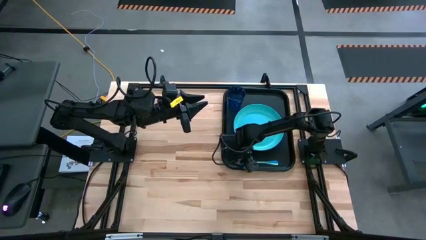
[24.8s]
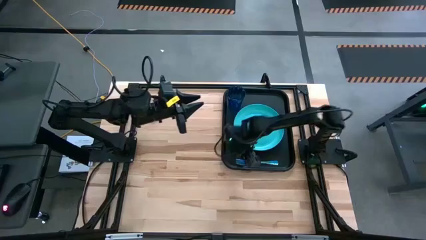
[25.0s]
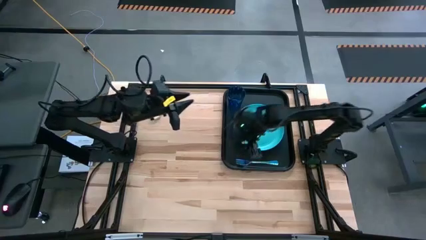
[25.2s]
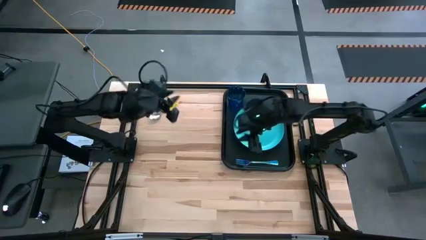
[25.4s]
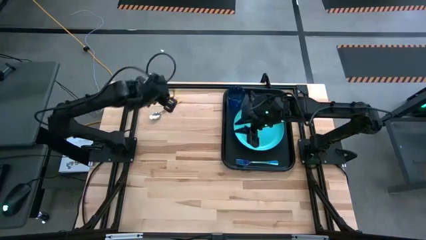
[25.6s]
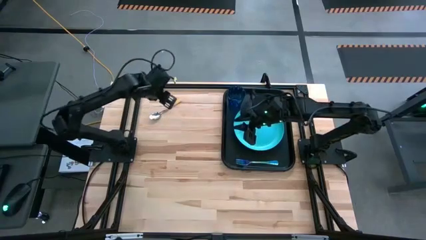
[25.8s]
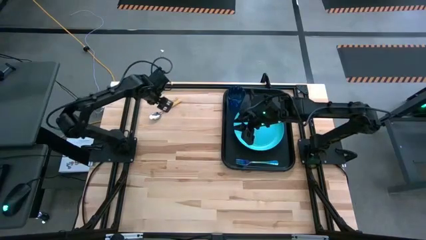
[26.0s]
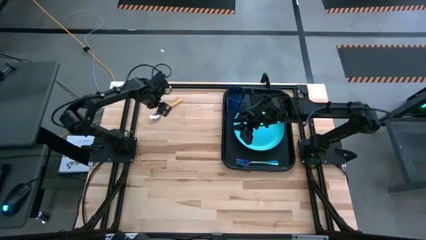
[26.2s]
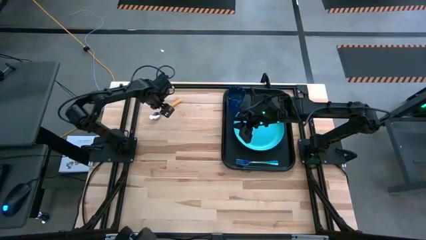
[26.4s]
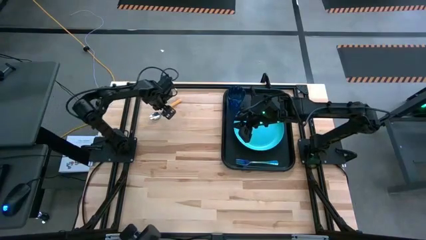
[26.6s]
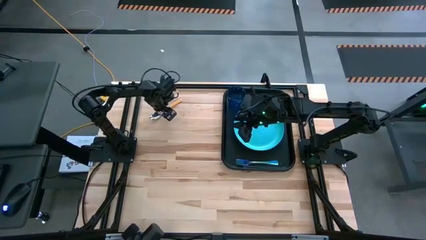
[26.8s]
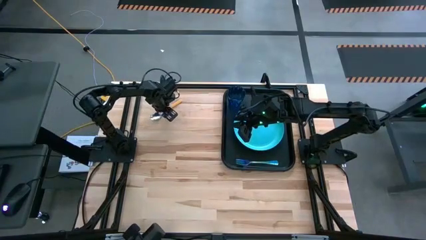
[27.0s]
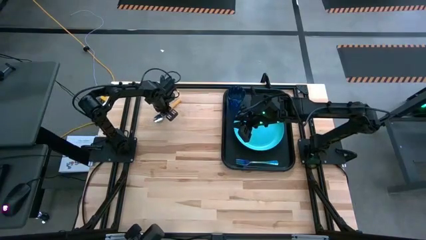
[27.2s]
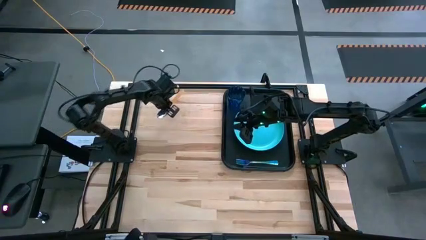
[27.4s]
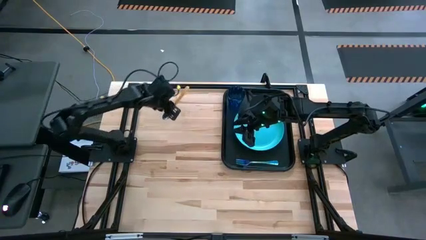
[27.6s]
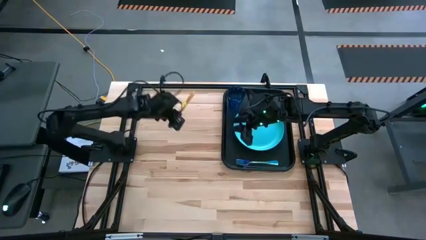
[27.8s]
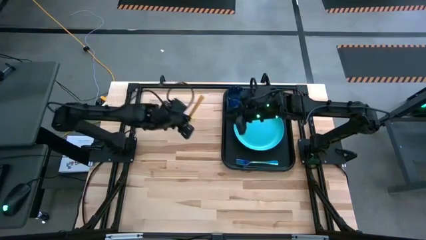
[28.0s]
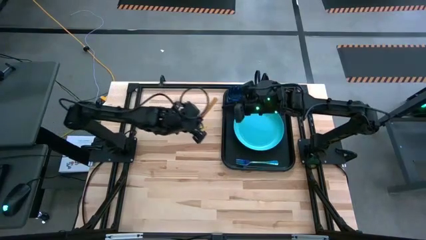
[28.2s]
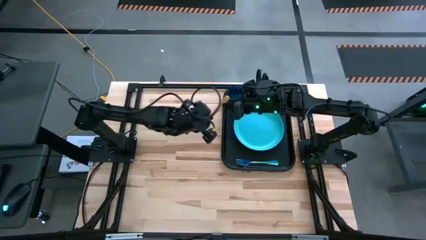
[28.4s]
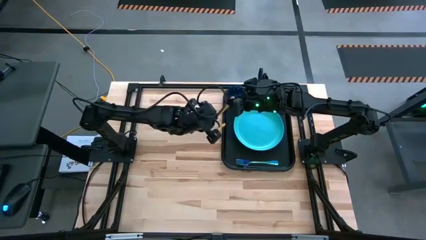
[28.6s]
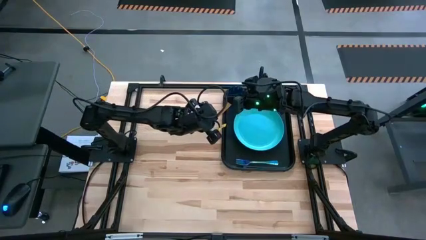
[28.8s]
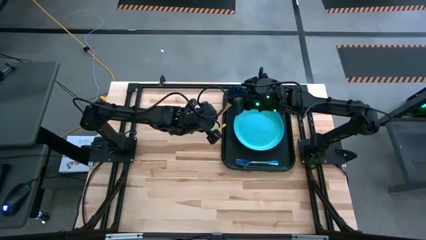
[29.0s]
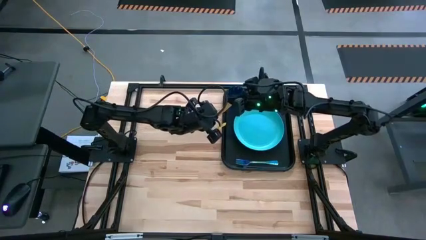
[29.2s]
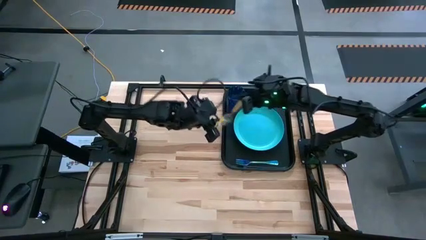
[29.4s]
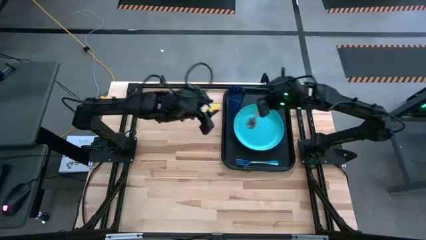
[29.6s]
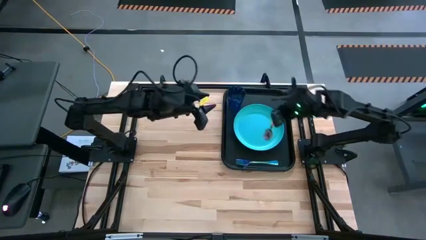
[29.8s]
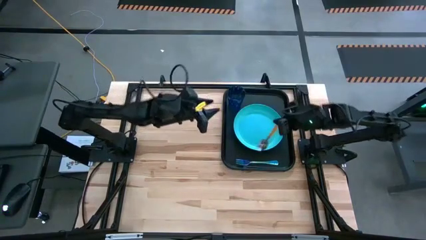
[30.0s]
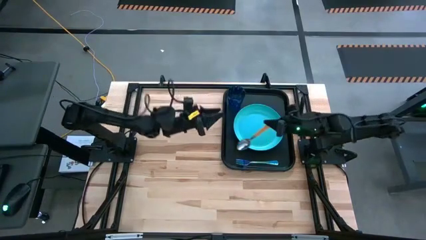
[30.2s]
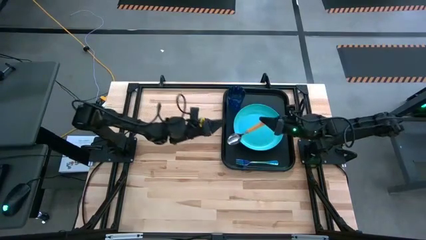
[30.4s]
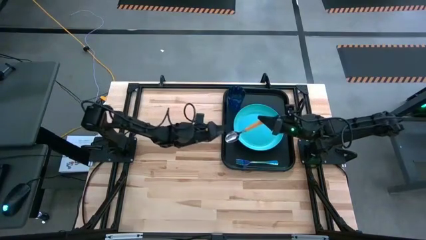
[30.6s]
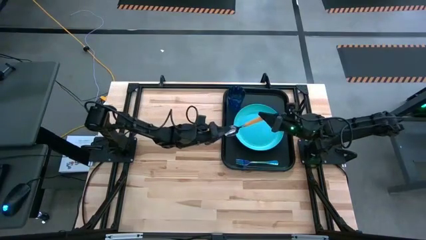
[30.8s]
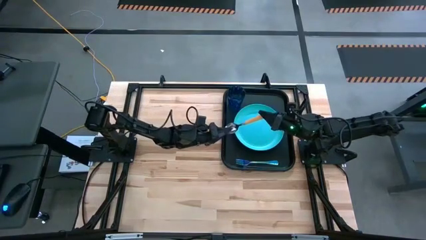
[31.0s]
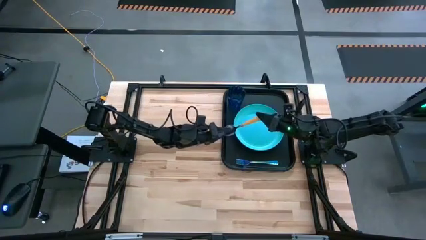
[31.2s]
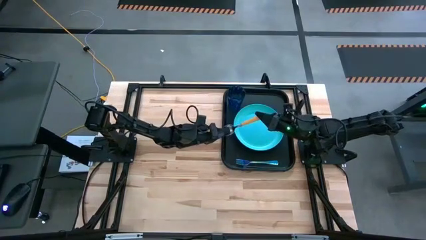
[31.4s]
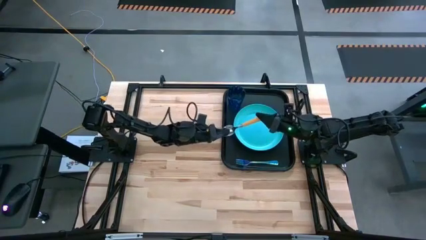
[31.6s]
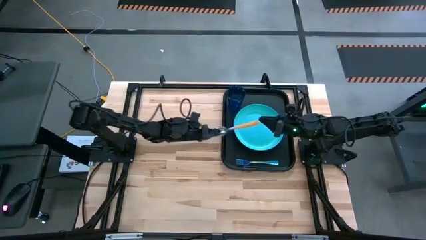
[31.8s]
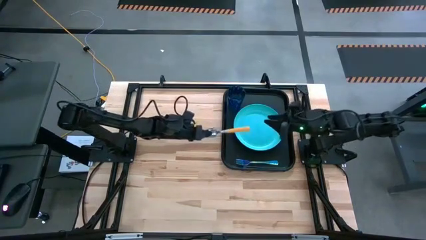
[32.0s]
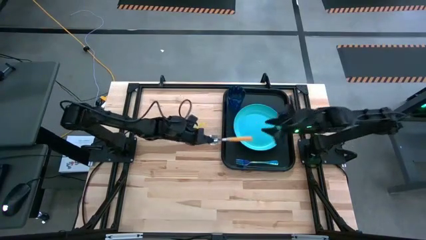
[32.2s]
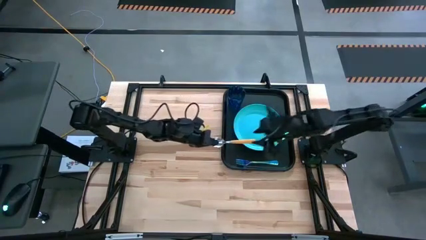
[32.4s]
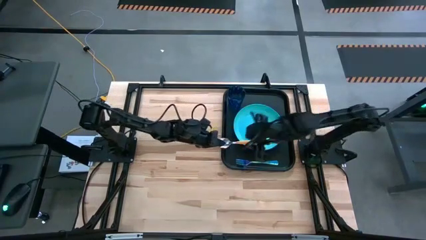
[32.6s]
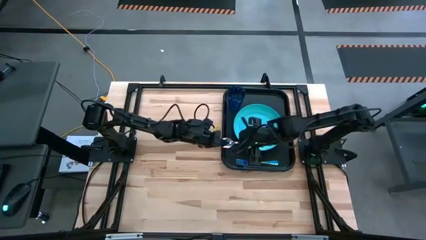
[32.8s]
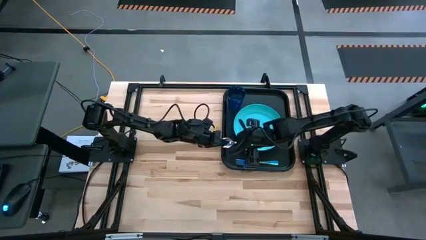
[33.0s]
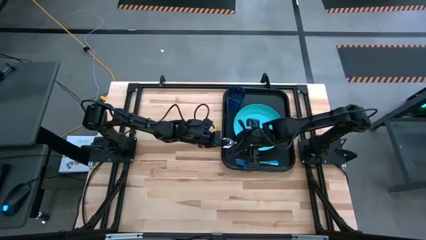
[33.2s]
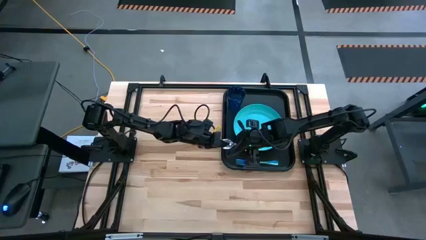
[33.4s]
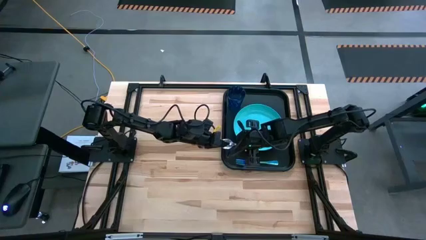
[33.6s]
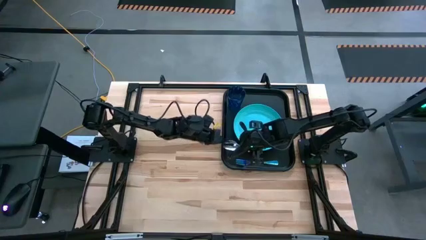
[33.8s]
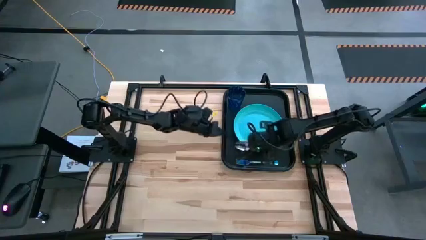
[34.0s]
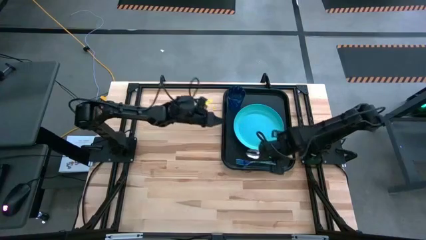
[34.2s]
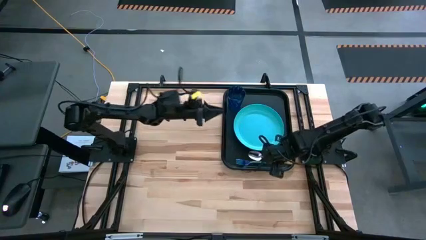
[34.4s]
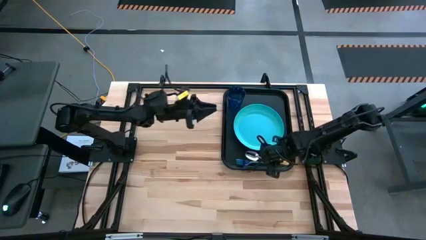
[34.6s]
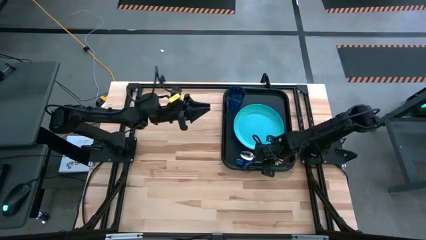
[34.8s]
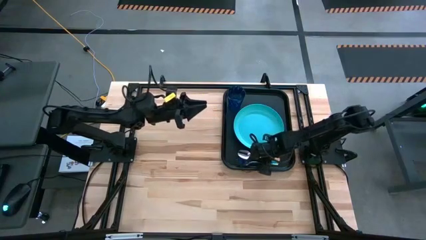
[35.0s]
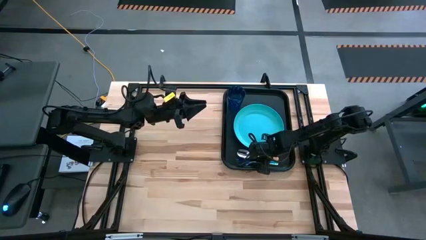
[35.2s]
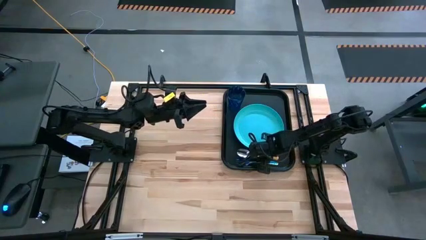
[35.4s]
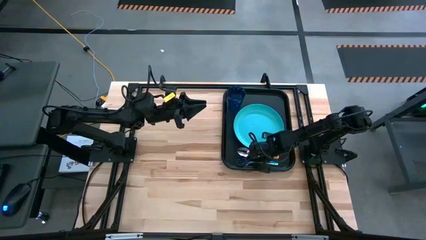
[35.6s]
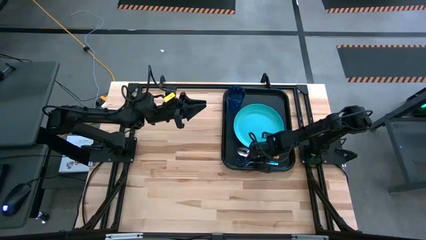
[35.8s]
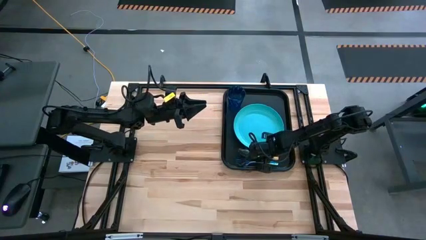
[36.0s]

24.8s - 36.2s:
Task: Pick and place plate/cup/fork/spoon on tray
Put the orange spoon on the black tray to bottom of the blue plate

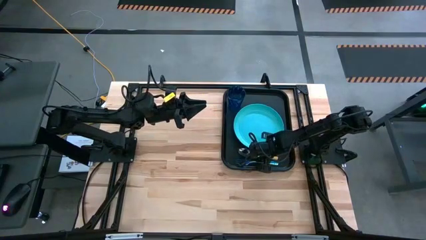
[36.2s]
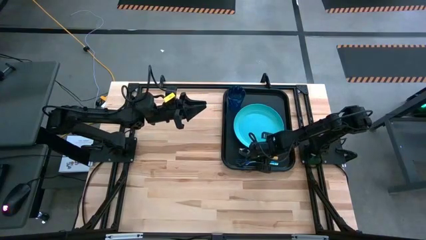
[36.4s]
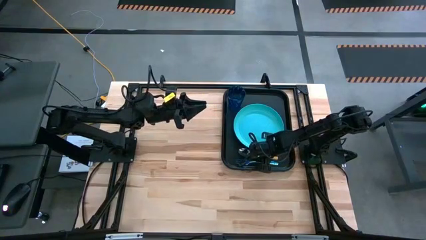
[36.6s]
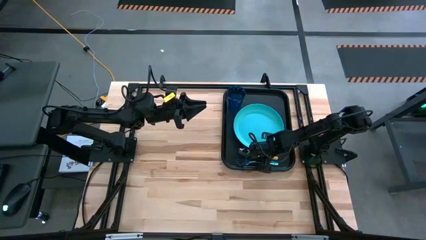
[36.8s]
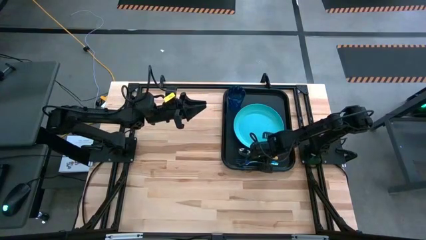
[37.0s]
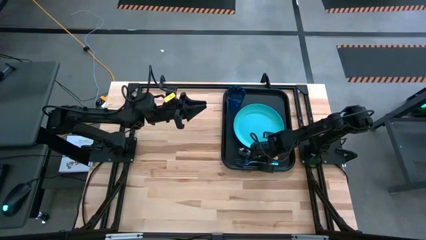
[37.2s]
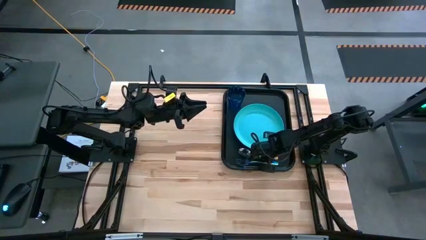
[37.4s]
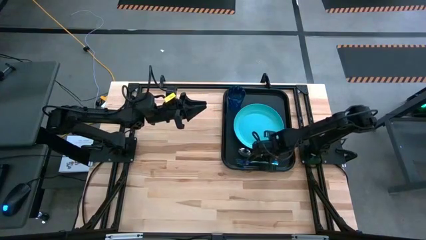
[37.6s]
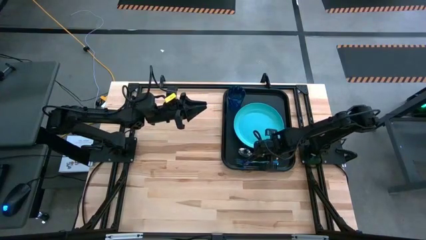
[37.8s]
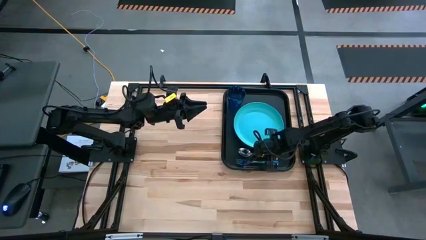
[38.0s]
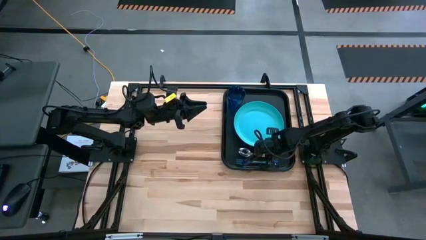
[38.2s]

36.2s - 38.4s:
Adjust the blue plate on the black tray

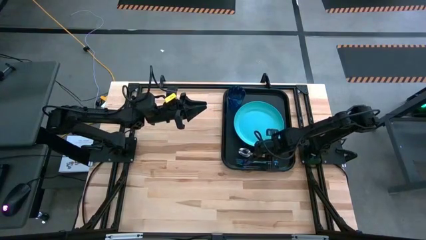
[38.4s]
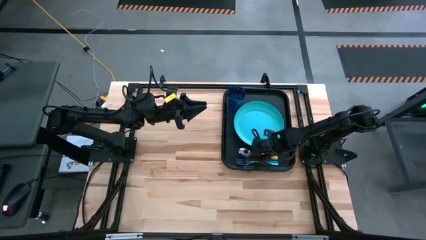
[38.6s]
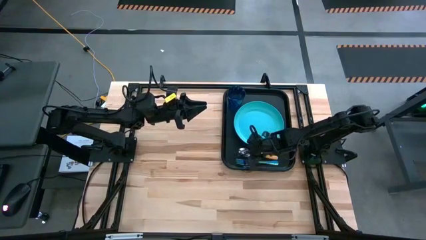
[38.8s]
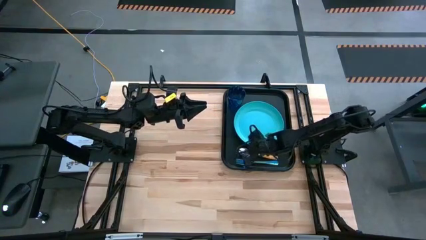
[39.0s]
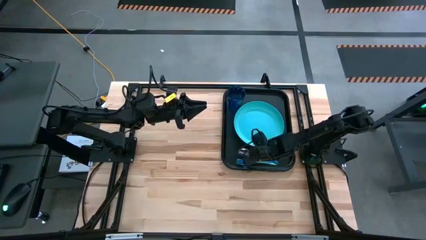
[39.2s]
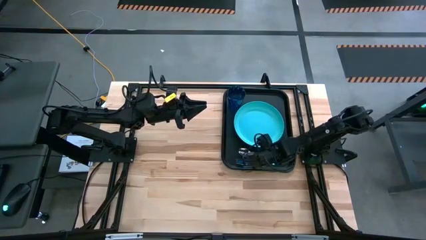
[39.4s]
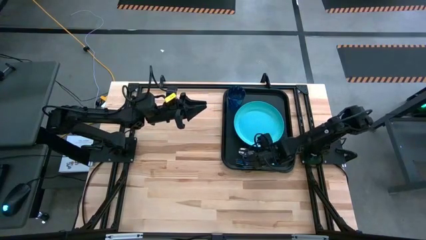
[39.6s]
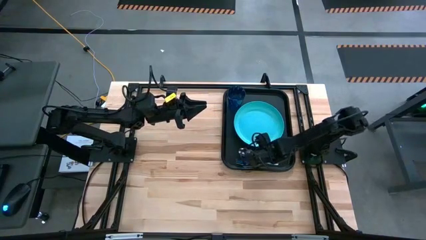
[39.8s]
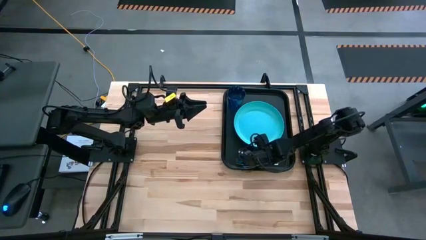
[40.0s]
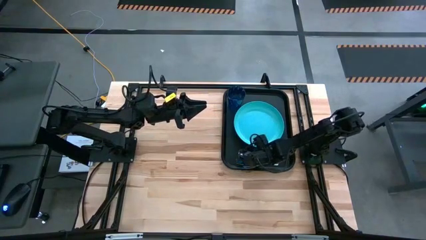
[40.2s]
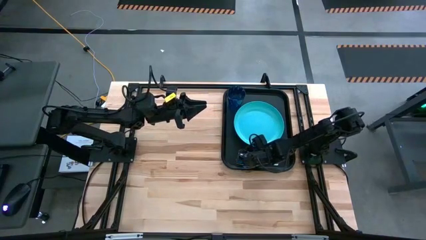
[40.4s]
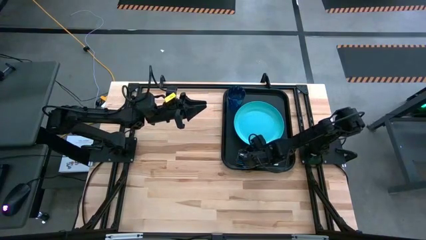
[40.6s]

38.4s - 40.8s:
Adjust the orange spoon on the black tray

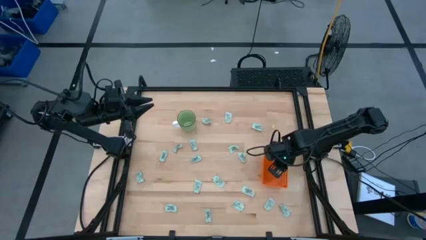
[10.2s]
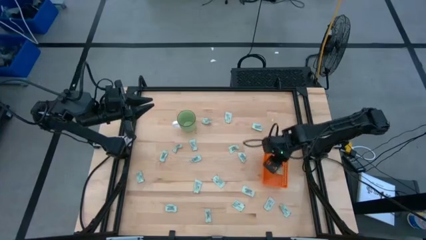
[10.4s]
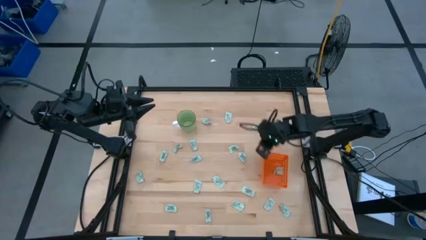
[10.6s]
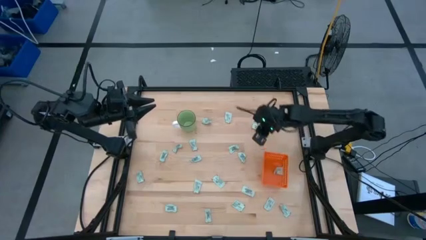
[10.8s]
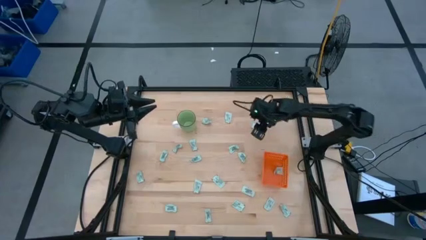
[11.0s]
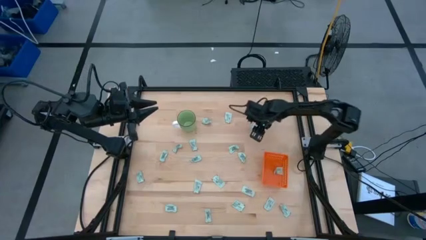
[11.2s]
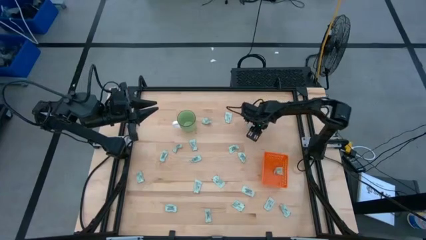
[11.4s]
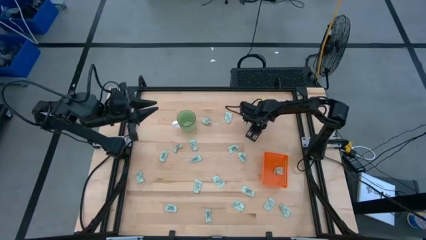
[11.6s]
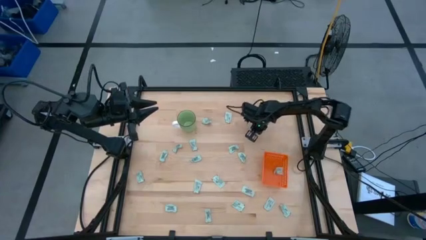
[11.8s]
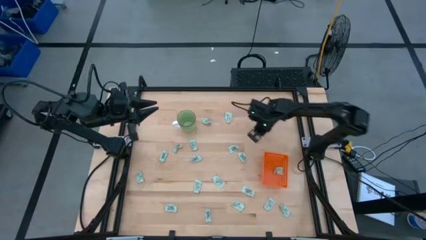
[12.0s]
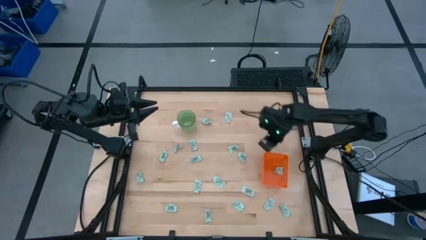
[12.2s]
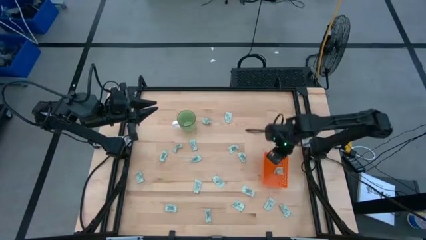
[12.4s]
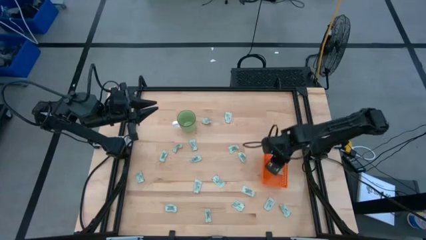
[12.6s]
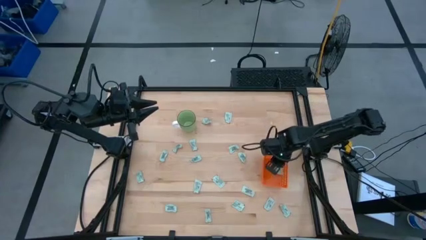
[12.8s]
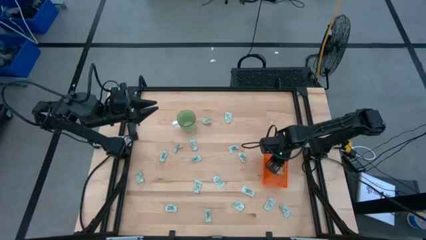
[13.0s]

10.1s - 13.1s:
Task: Pick and place Stevia / Truvia into bins
Put the stevia packet into the orange basket
